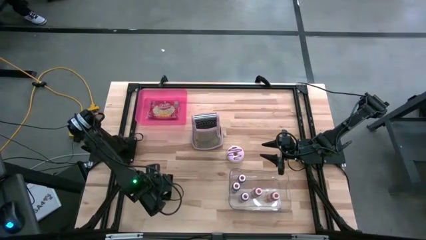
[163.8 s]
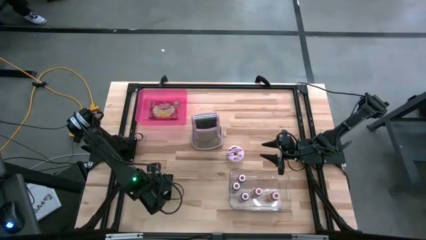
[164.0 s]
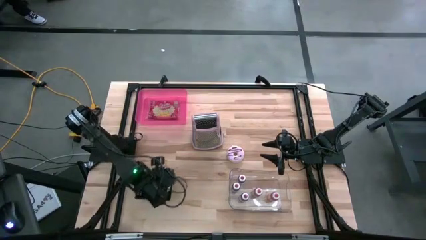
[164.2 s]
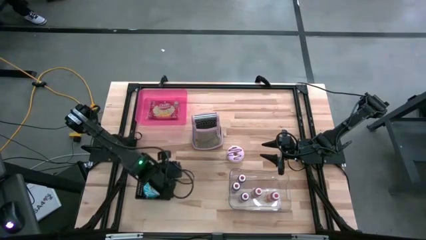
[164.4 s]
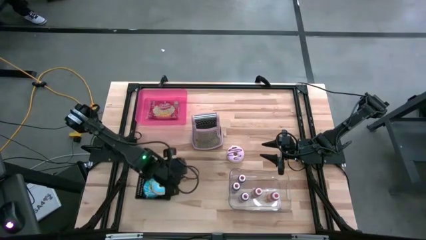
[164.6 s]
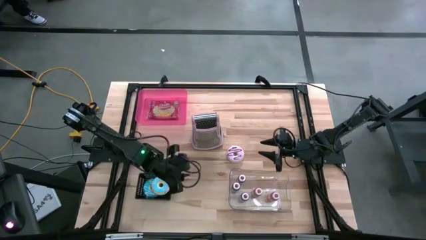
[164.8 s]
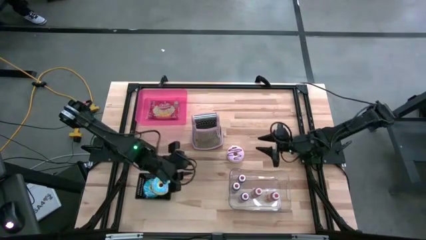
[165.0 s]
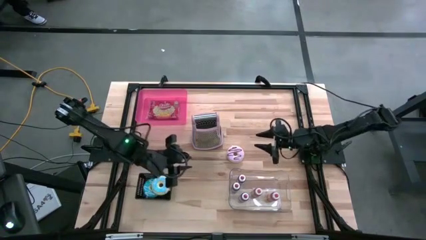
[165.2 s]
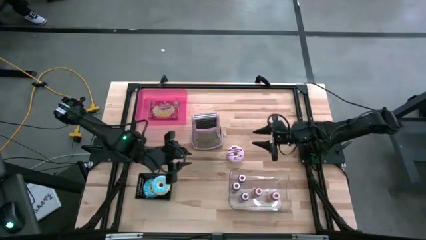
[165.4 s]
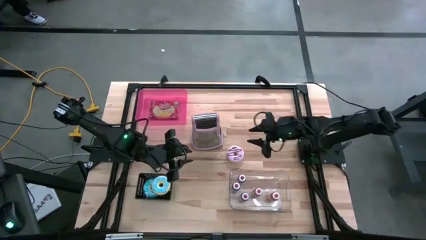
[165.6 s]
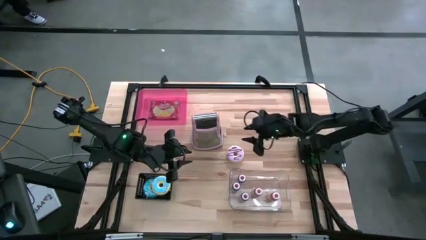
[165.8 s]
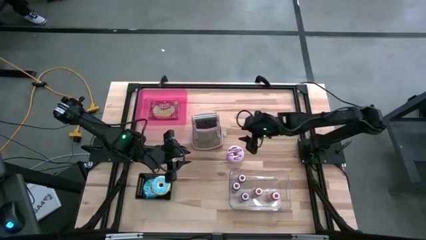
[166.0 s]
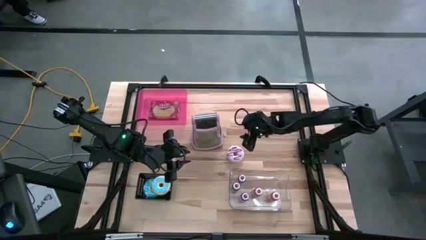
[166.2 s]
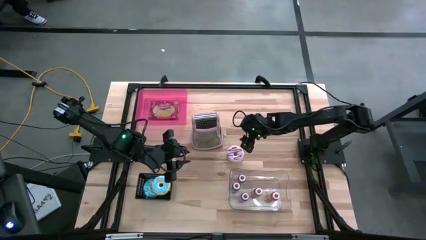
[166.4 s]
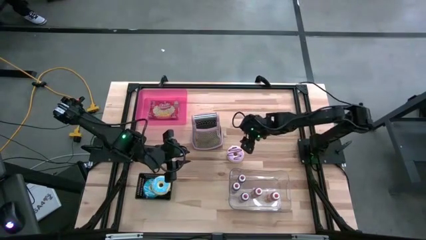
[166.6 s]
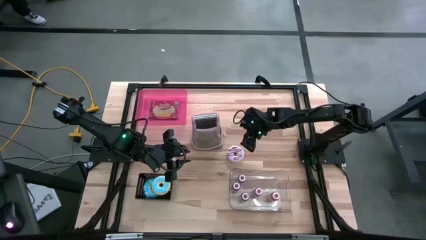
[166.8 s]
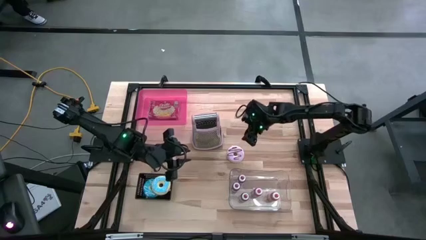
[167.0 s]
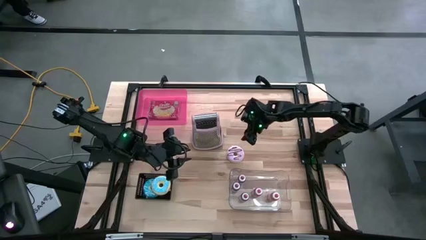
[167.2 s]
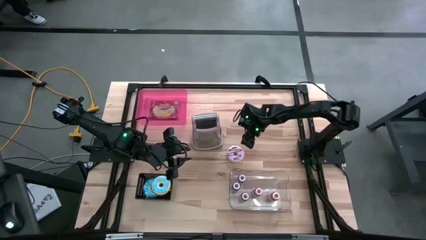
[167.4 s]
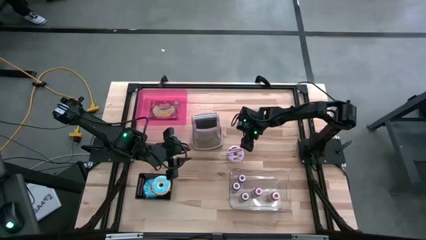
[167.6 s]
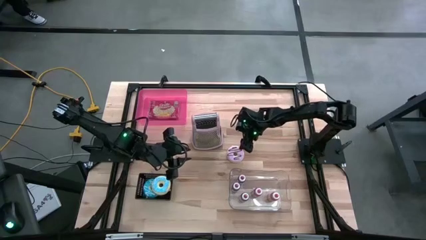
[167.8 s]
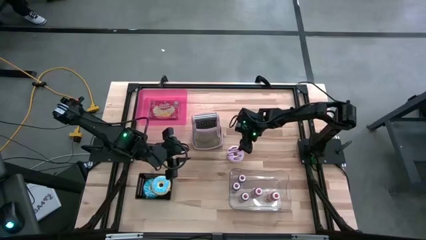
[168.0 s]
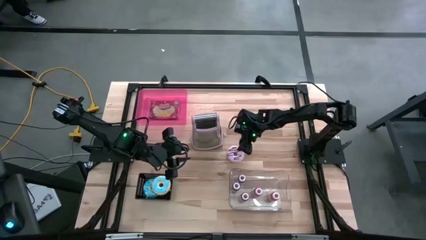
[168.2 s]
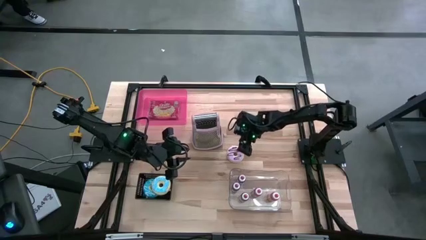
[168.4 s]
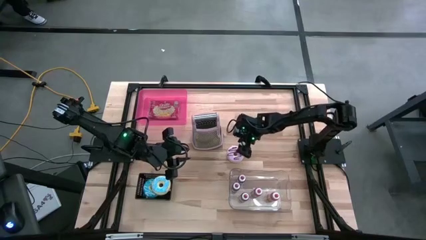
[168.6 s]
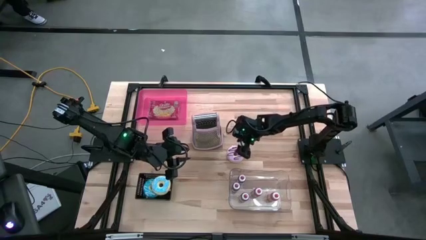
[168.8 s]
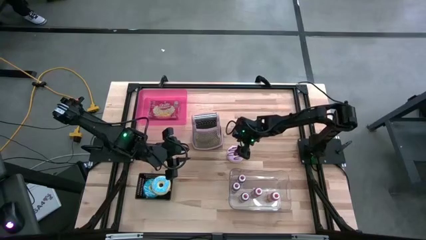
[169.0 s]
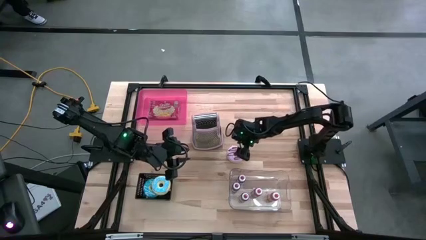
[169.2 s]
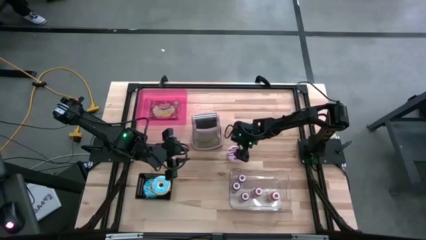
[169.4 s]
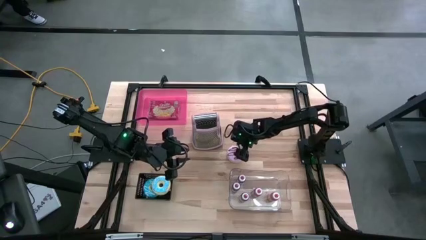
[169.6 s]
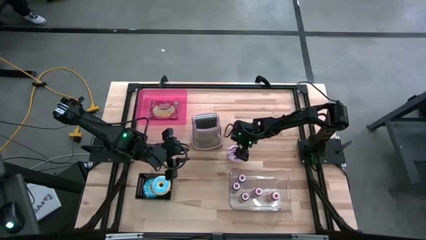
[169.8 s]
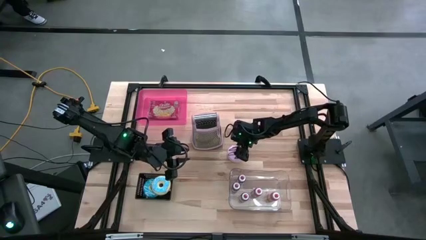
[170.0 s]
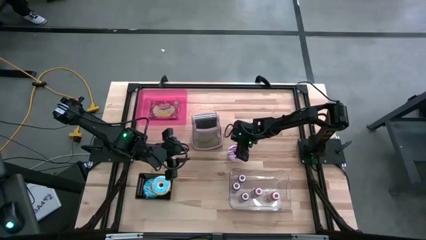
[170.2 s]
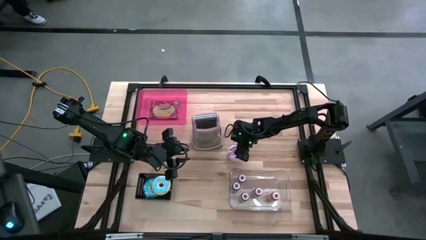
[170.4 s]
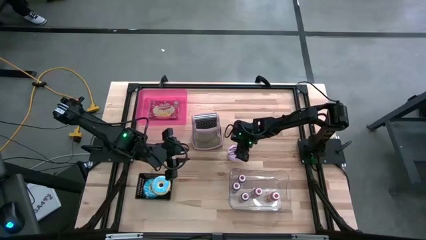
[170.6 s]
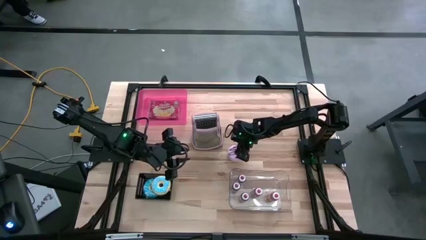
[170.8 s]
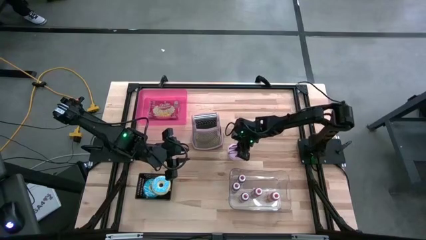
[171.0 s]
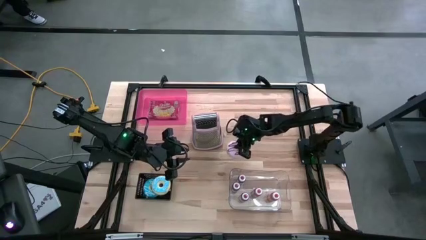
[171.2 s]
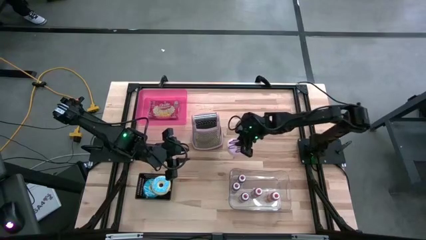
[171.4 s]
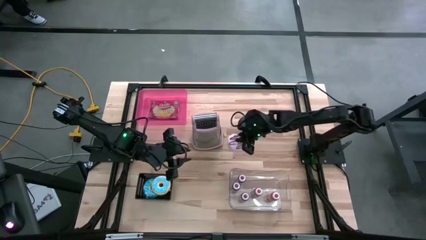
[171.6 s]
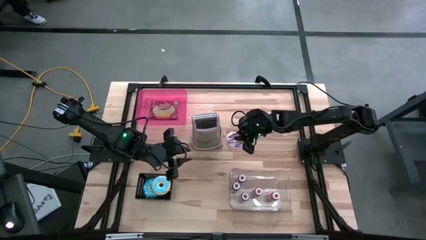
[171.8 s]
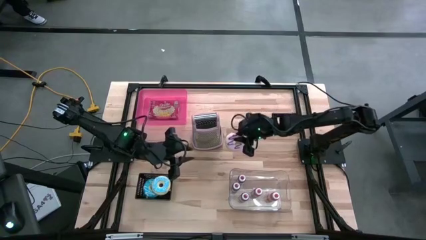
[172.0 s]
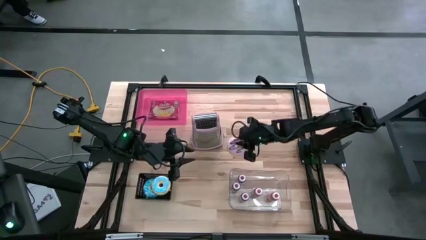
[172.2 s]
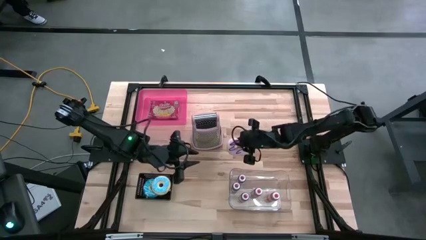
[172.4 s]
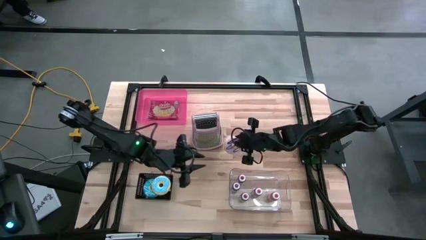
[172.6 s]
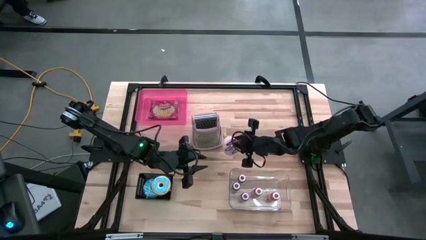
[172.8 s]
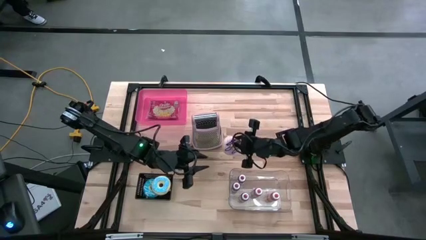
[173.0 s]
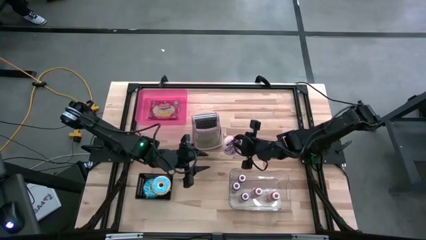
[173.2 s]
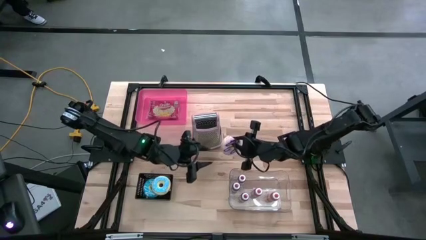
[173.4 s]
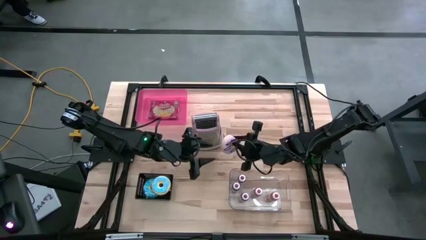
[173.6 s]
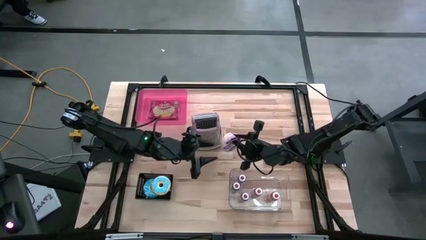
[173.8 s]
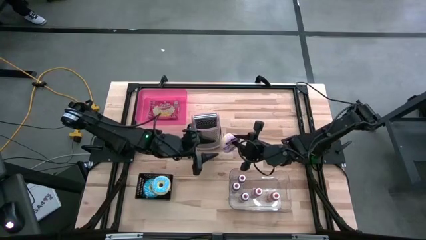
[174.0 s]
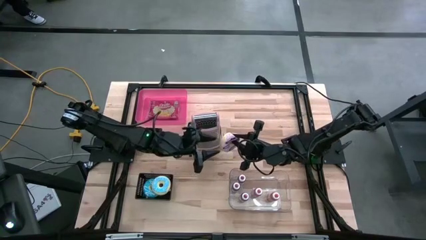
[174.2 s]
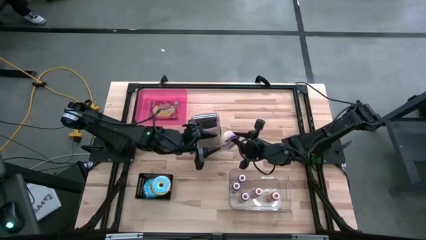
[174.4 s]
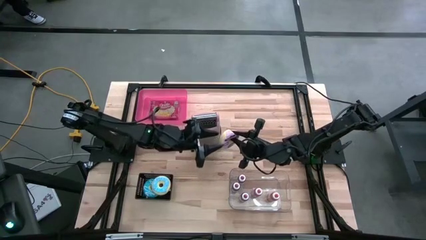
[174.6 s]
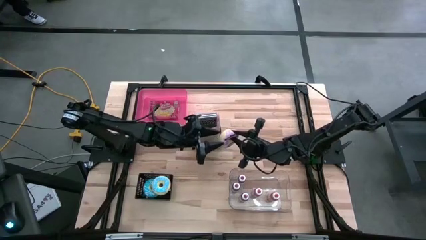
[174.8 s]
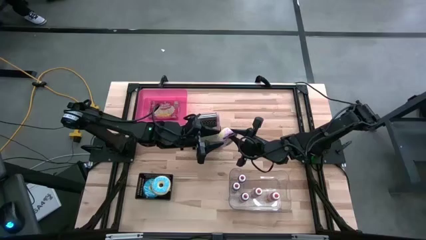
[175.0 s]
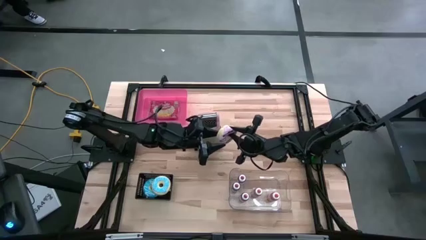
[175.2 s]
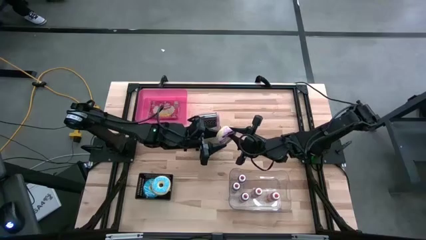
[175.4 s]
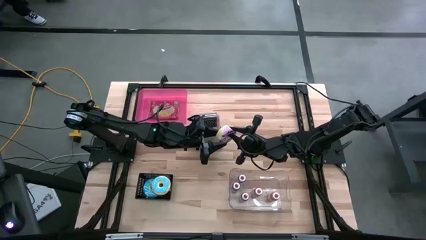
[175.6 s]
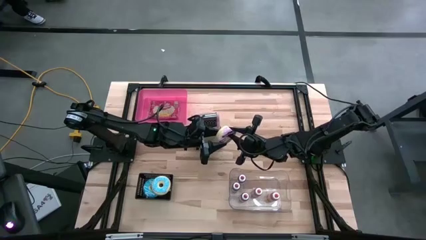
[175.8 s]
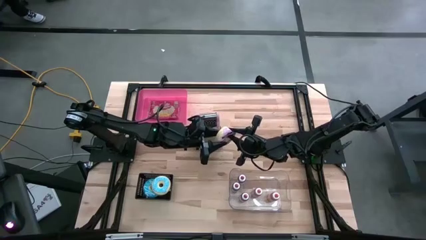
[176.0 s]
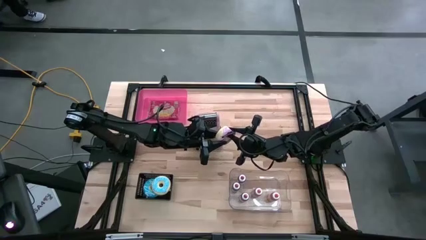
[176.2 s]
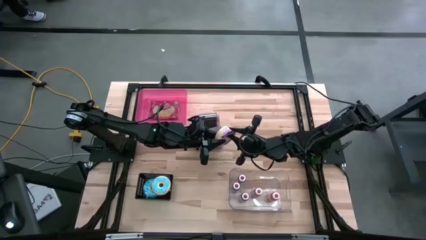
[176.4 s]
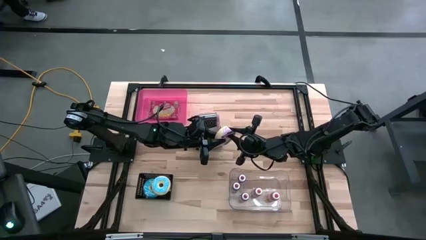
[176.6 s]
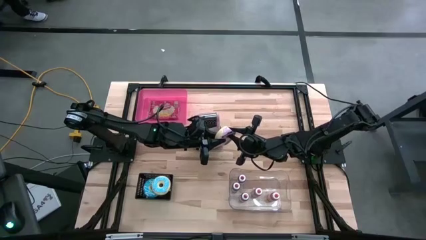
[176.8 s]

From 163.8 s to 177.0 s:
Task: Pick & Place Food Item
Put the purple donut toy into the black bin

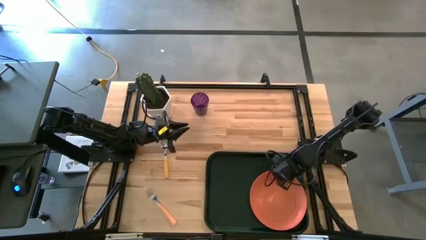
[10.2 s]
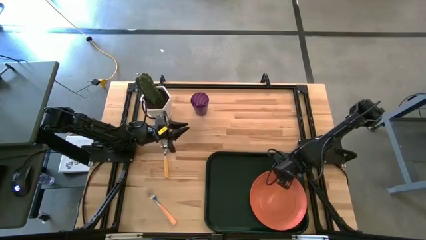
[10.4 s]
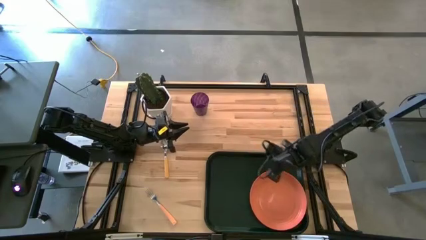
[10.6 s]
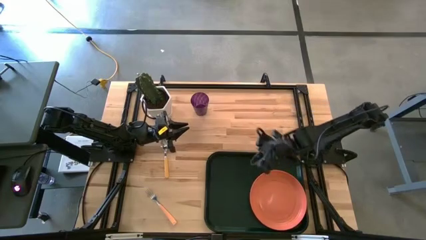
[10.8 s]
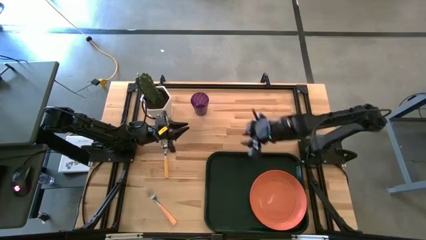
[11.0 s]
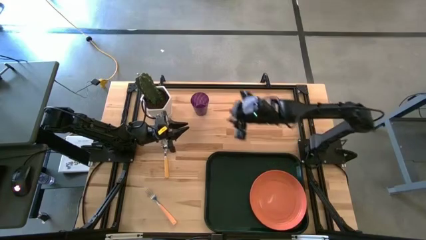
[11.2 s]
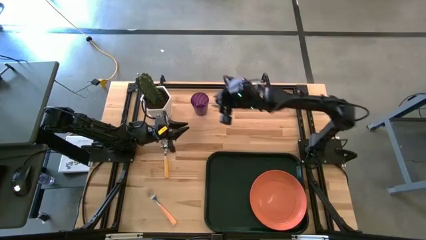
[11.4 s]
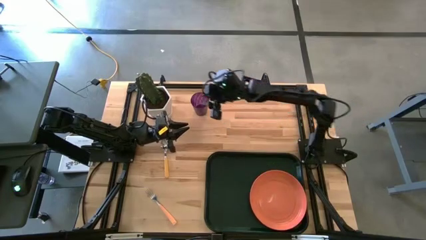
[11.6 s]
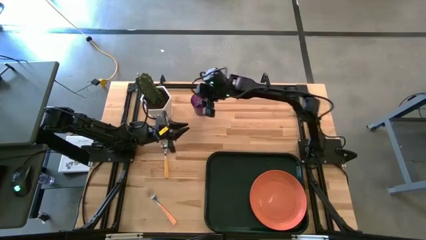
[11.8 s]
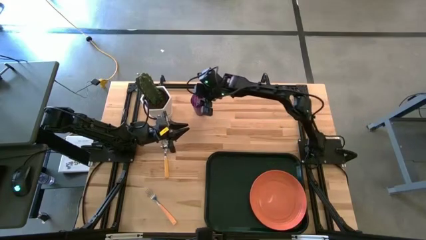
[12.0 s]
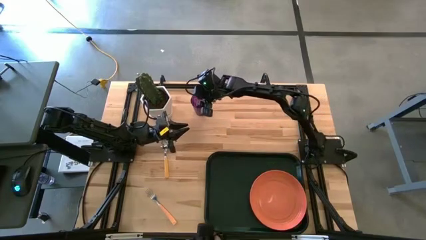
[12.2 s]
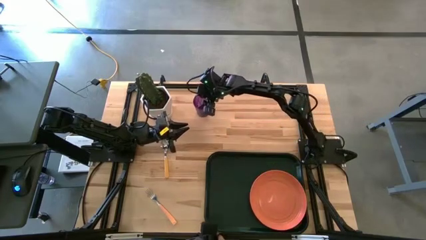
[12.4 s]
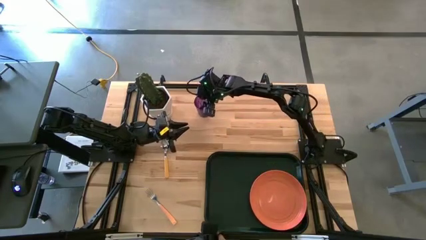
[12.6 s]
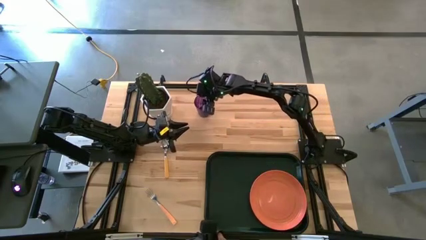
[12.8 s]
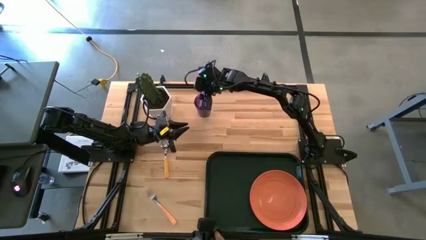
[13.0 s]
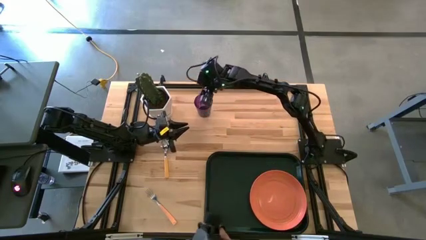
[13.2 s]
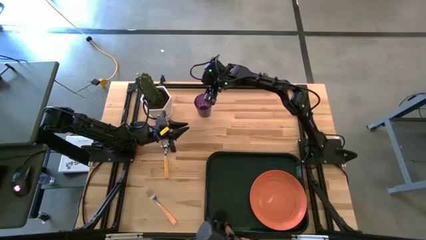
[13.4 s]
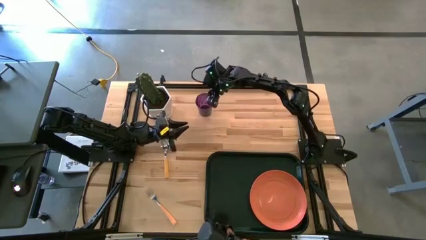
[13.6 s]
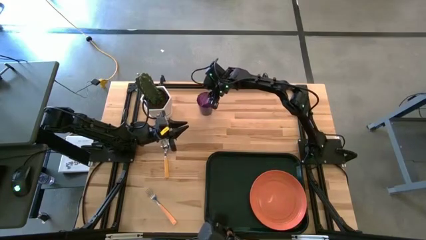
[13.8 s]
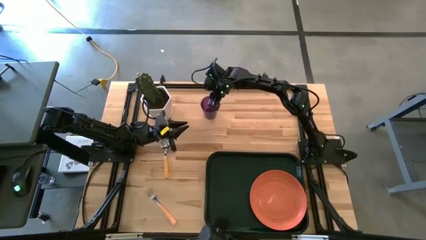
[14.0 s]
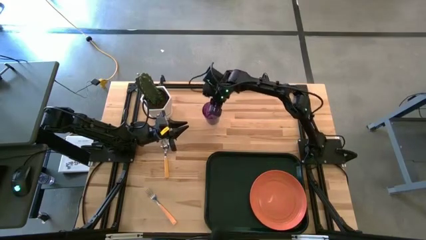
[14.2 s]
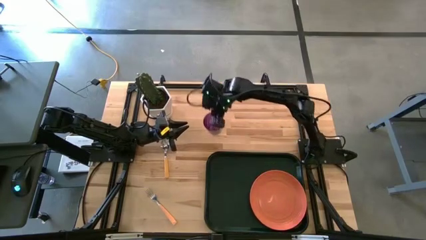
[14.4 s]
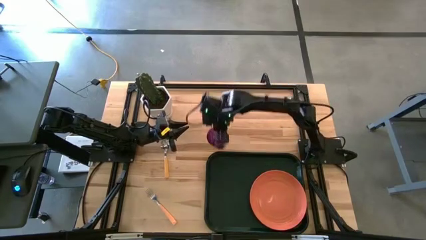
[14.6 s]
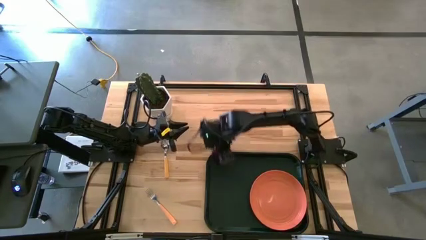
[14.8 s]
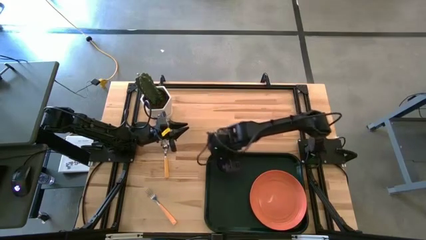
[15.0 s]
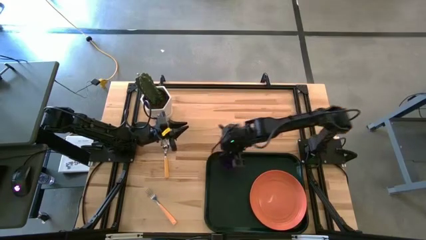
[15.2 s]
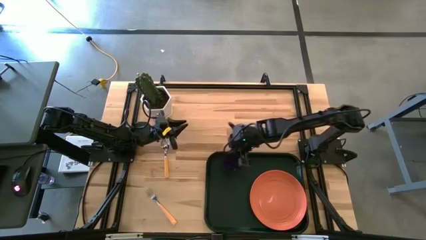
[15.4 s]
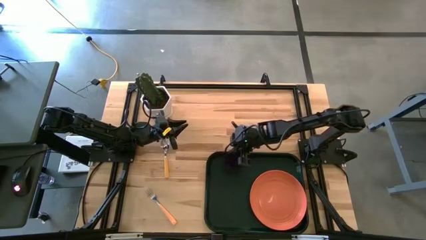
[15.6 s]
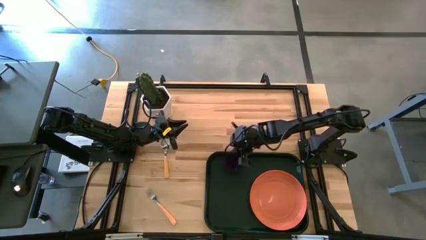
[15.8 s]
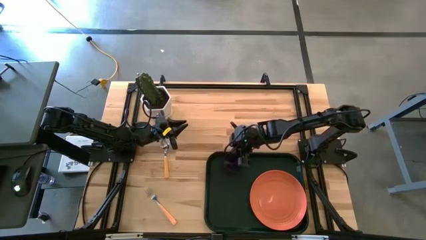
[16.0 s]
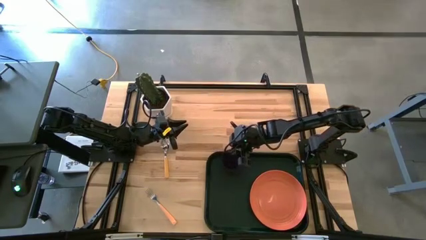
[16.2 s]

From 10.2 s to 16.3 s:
Task: Pick and place plate/cup/fork/spoon on tray
Put the violet cup on the black serving tray to the top left of the orange plate
